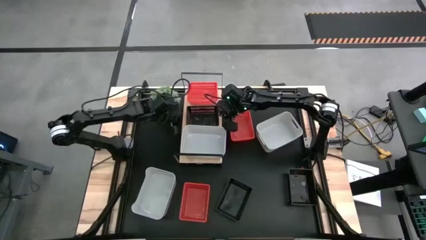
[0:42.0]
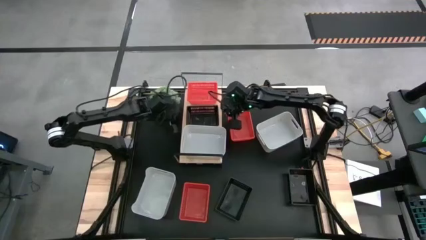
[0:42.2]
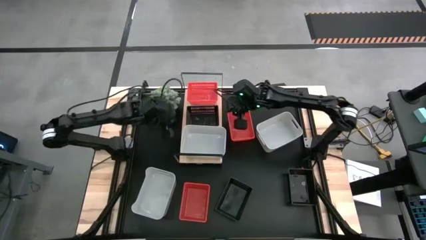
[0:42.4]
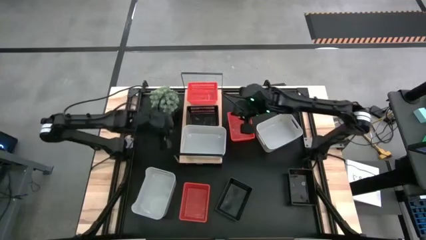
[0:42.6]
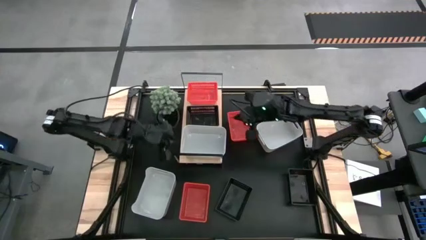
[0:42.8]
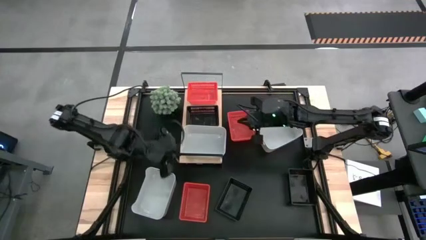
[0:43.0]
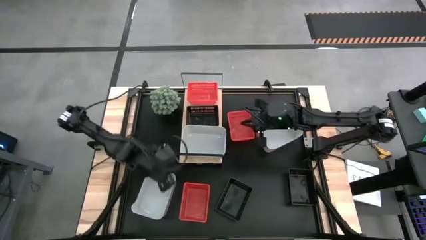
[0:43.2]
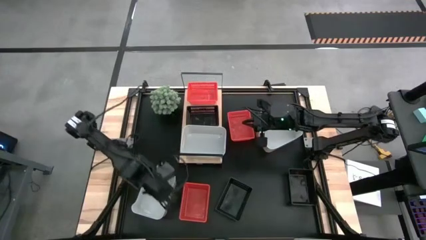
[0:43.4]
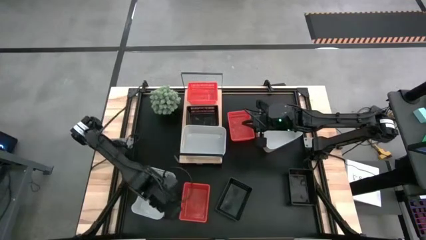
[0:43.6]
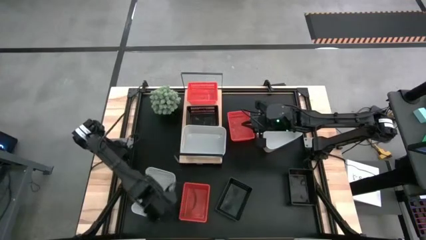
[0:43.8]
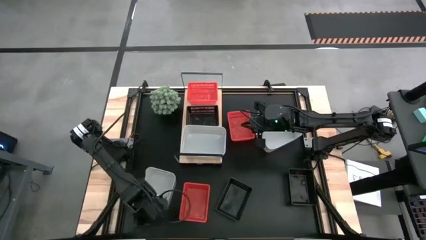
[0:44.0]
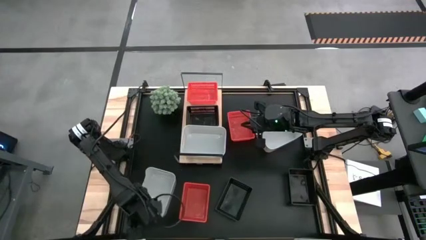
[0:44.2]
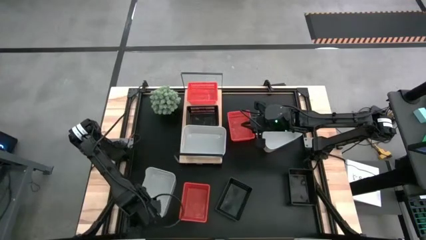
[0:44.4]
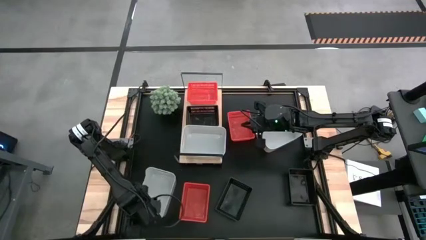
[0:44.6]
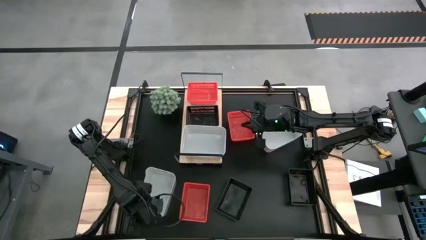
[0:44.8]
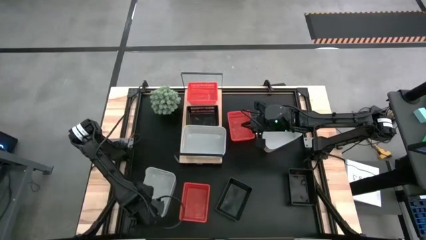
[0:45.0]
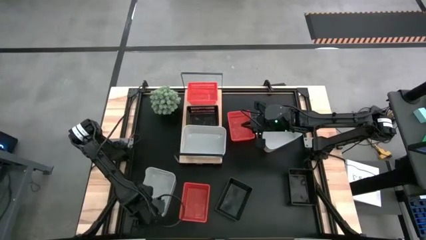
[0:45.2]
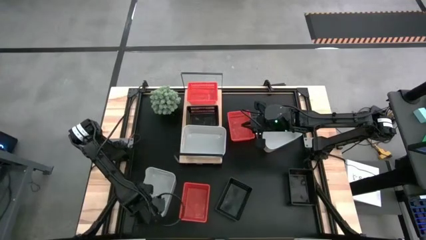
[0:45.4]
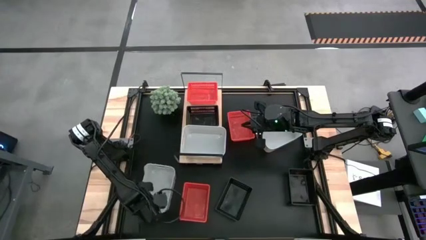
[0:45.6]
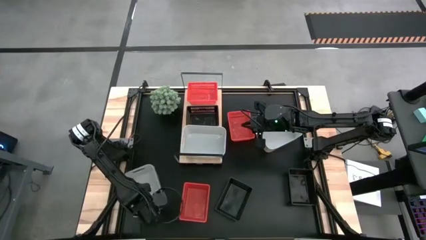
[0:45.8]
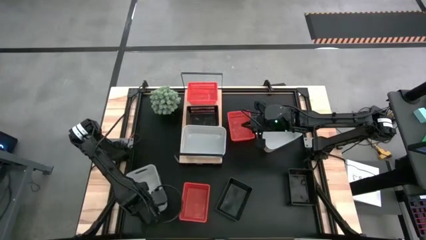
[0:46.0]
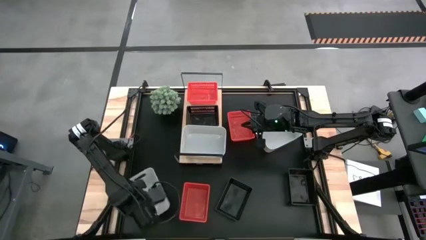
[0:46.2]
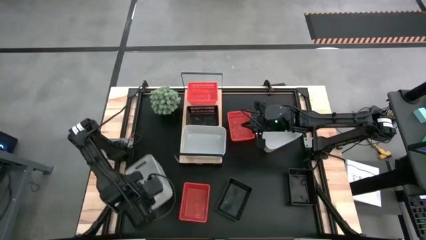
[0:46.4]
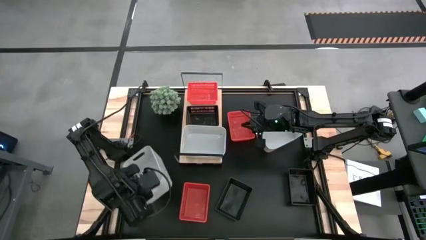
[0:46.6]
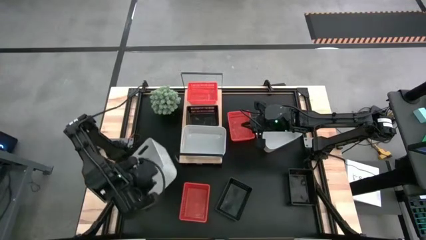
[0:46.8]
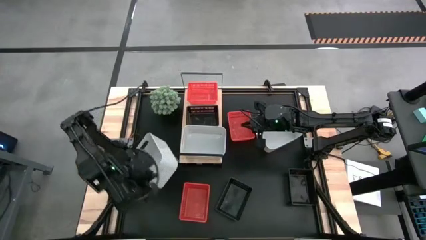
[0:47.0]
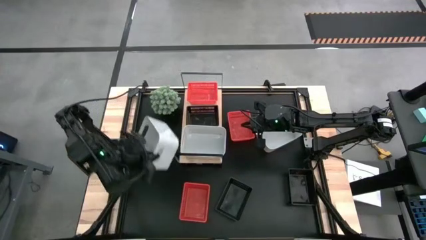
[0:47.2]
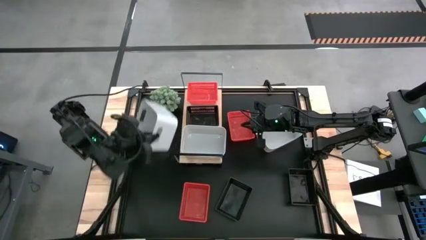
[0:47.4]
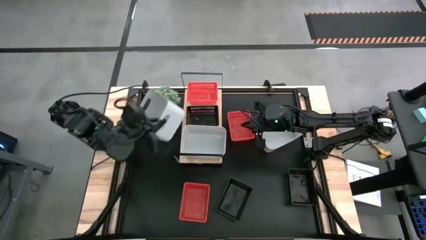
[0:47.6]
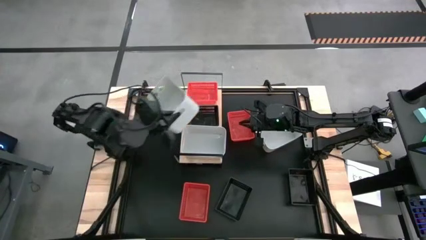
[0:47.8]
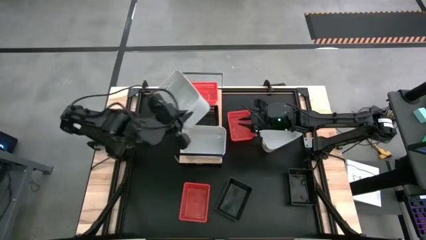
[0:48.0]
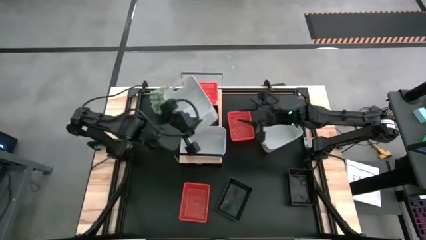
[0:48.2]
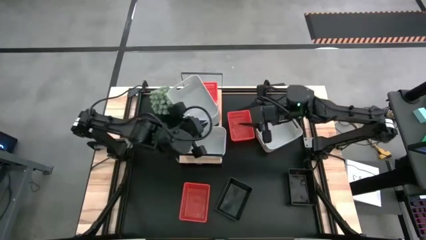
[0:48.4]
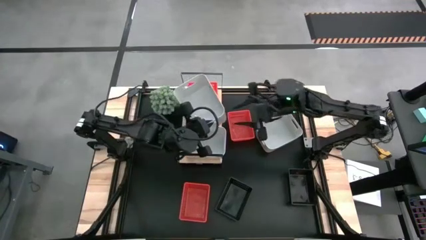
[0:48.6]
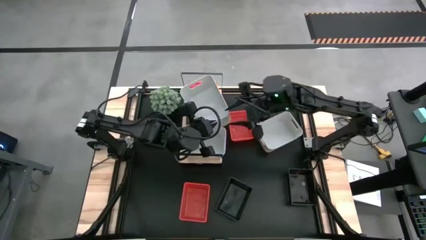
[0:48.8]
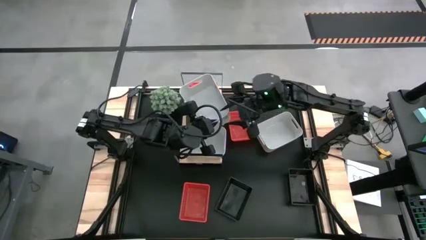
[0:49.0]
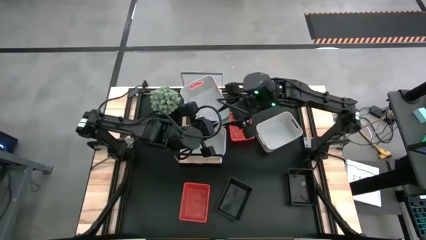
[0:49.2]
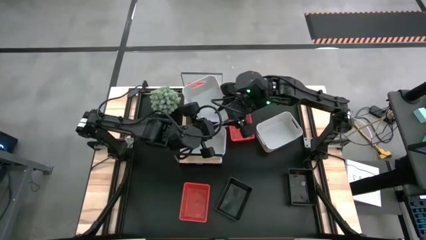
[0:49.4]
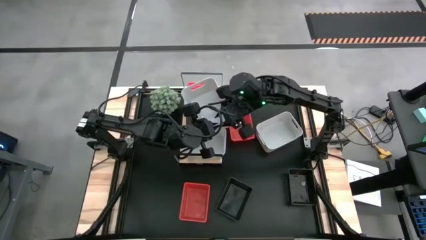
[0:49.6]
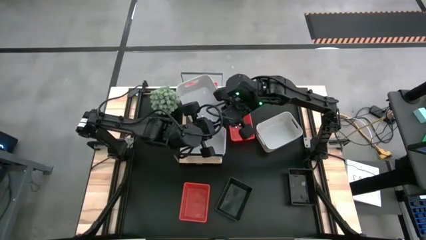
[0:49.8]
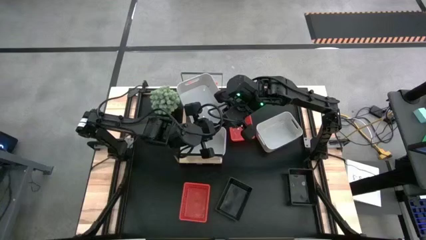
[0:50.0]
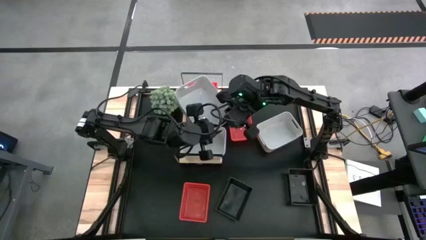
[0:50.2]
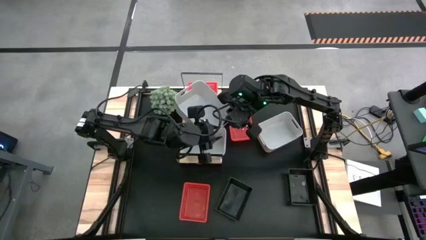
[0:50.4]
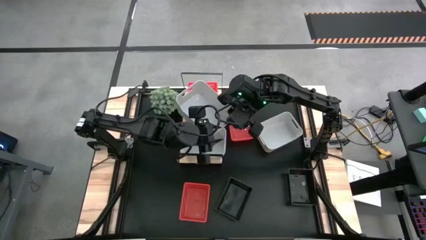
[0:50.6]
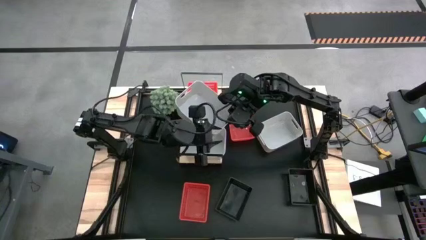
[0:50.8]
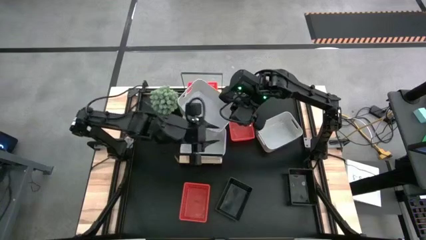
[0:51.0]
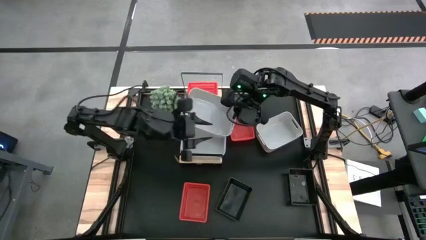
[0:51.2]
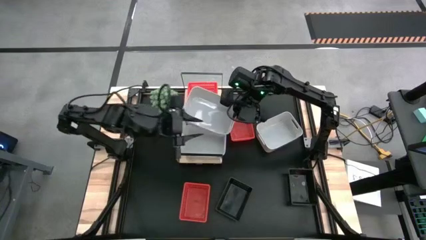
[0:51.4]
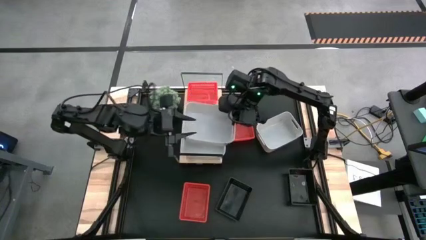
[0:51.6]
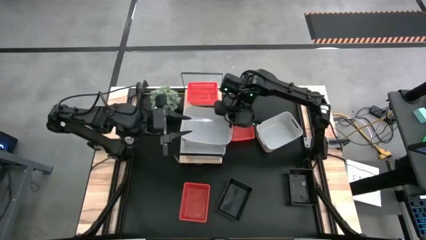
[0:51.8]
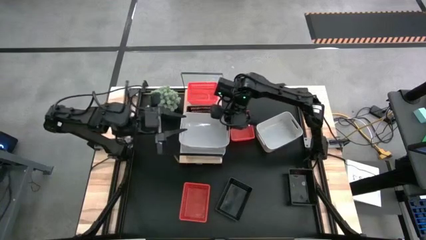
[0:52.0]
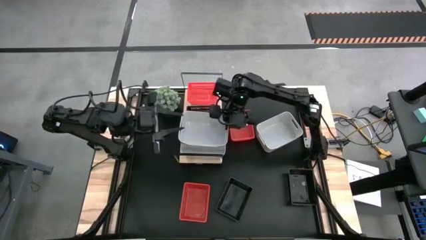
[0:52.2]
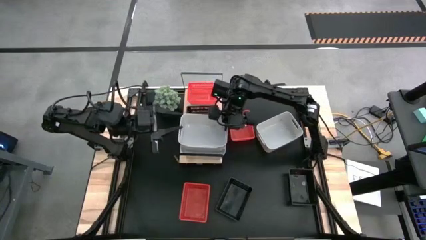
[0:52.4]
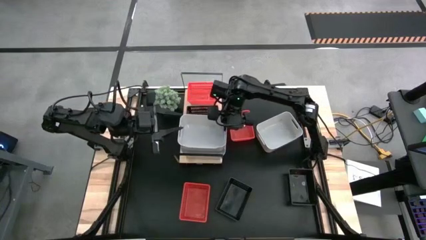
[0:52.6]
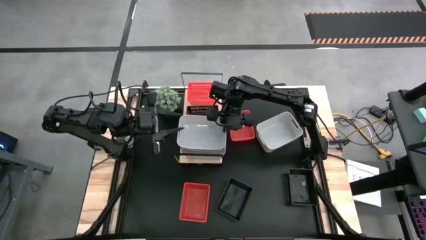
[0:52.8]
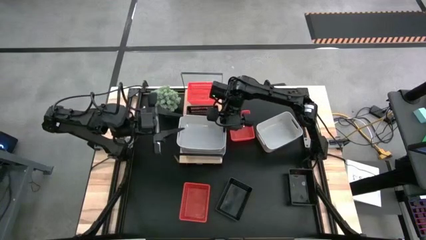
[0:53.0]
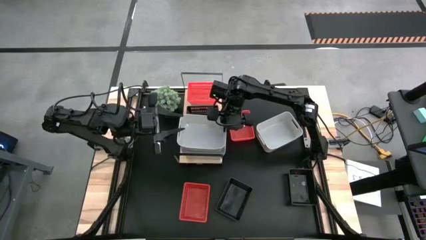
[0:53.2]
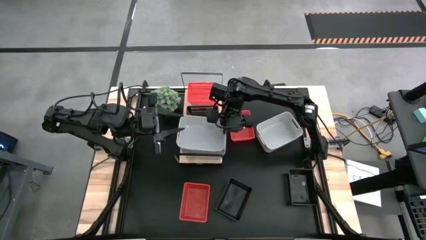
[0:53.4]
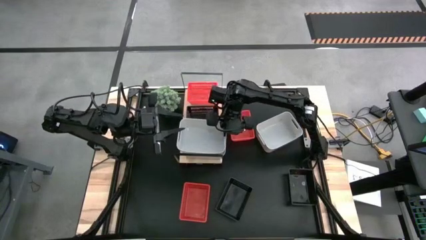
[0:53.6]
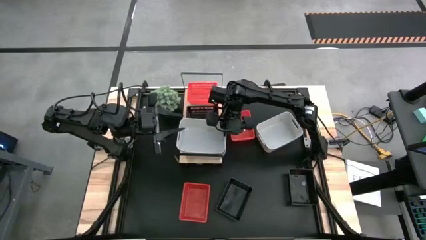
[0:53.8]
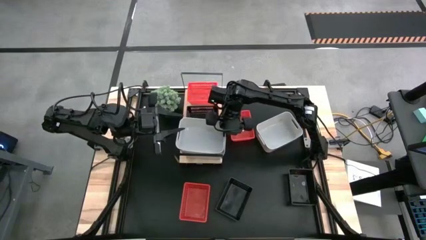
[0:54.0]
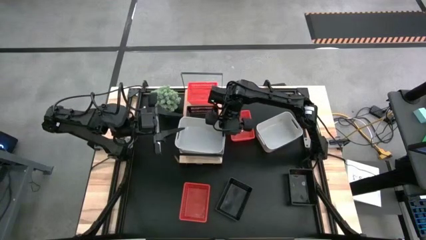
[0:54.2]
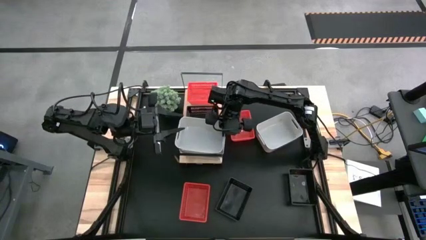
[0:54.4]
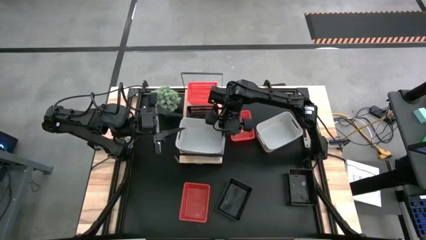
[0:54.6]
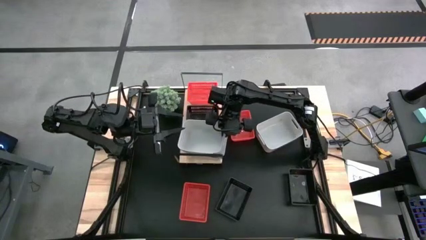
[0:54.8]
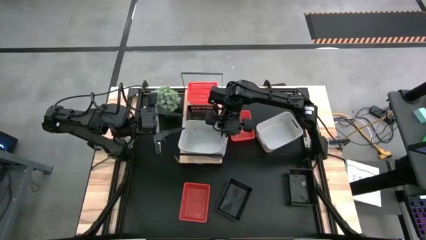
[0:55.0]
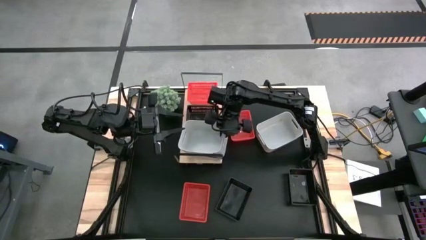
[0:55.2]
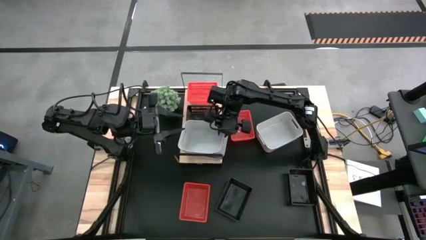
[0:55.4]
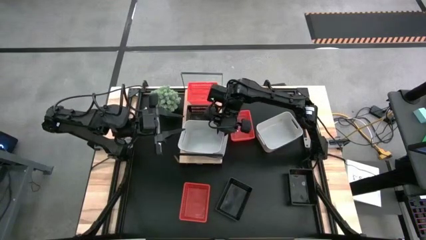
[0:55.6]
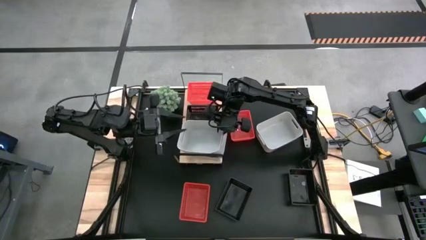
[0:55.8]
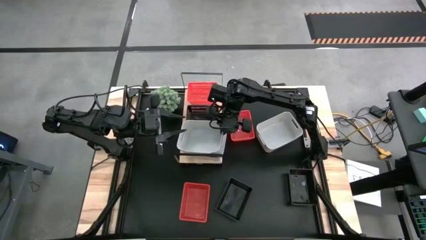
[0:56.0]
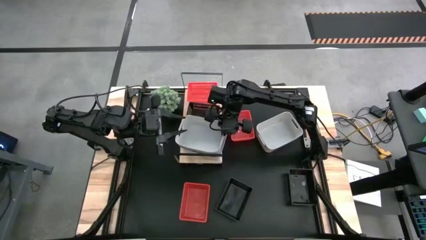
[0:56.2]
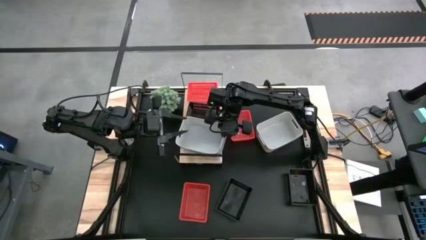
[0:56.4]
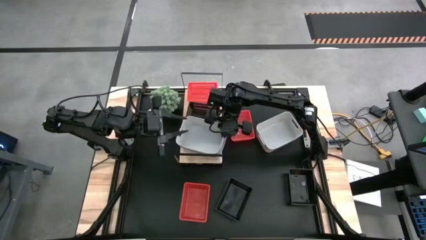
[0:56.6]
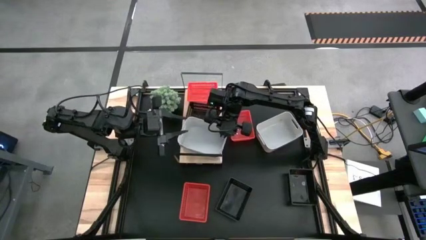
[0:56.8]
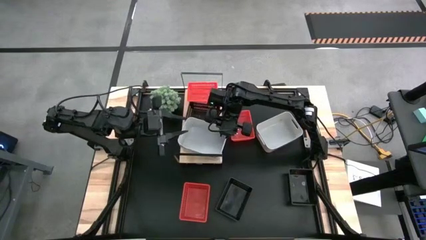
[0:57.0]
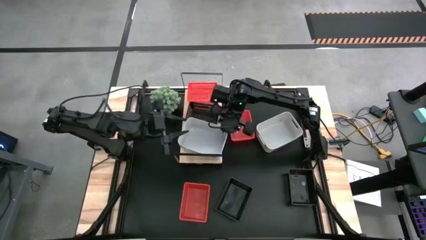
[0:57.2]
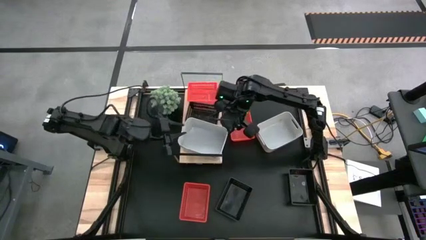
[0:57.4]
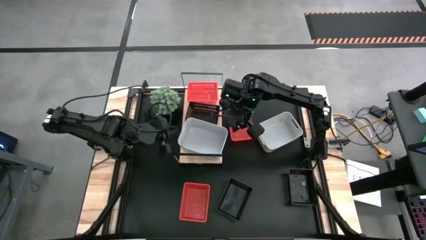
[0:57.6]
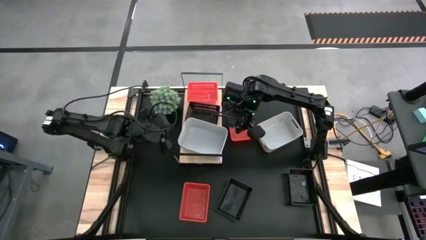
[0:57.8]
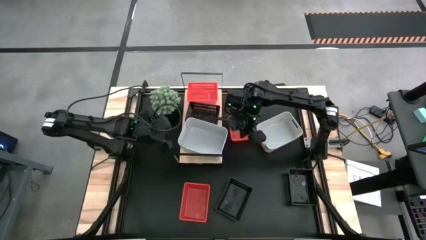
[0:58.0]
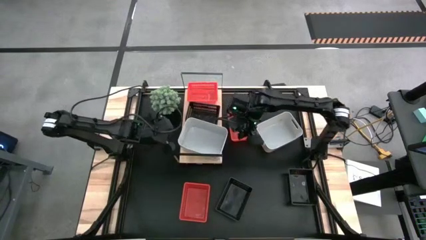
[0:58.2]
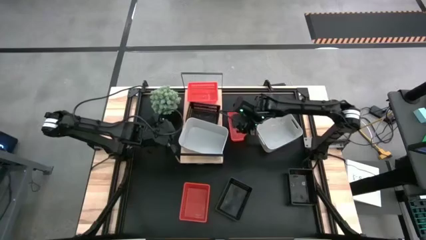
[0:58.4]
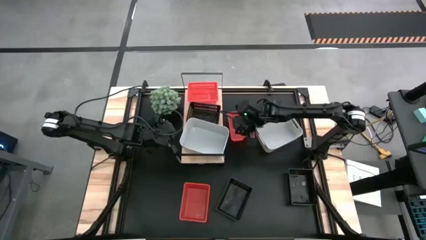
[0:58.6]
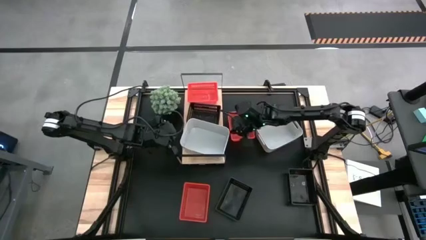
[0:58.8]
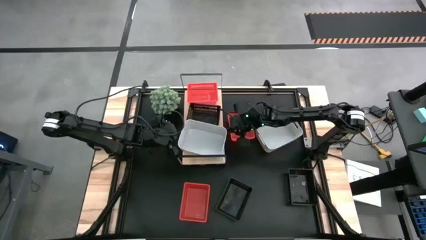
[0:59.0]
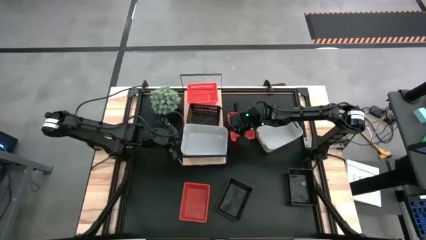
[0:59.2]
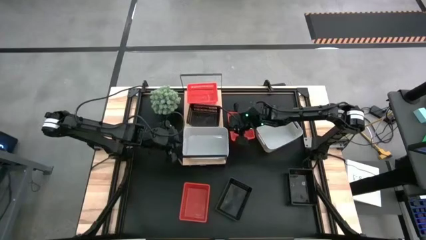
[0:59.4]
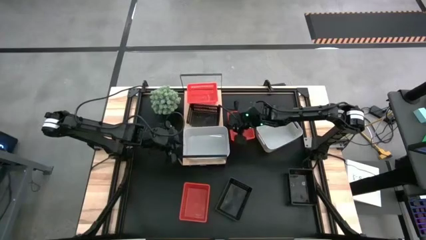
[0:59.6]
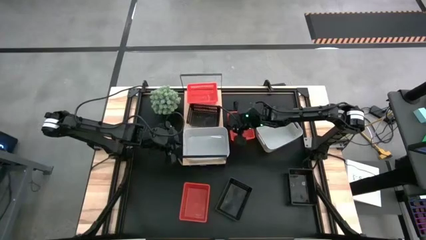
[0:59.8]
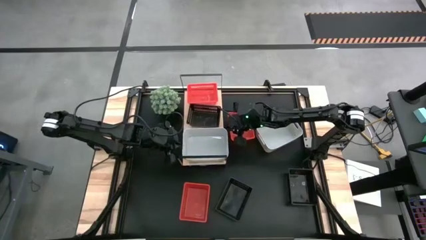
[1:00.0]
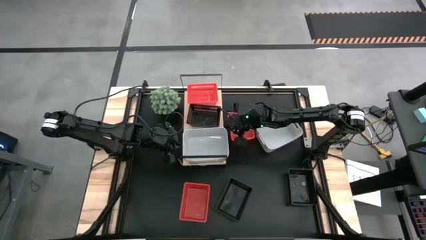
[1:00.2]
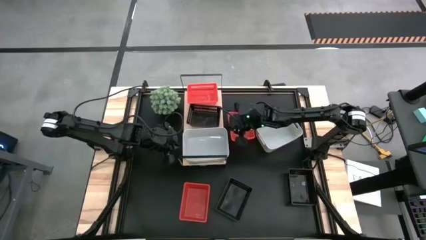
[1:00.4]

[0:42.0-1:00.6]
Task: Stack baskets on shelf by color
Stack the bottom gray bin on top of the gray bin on the shelf
